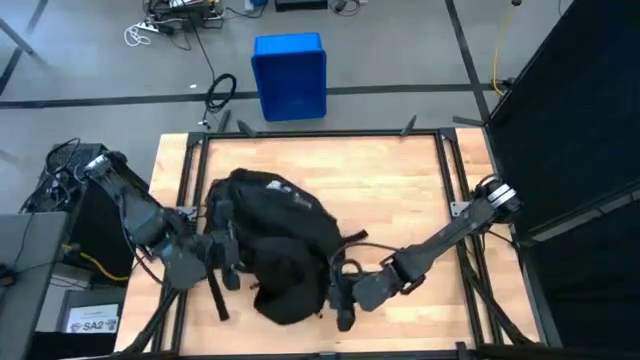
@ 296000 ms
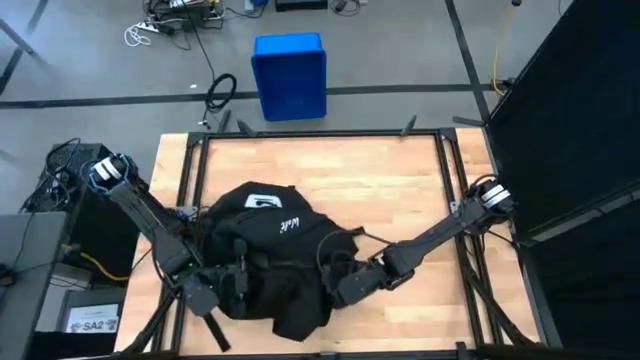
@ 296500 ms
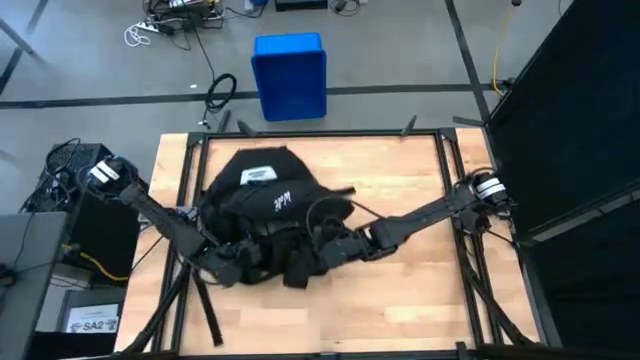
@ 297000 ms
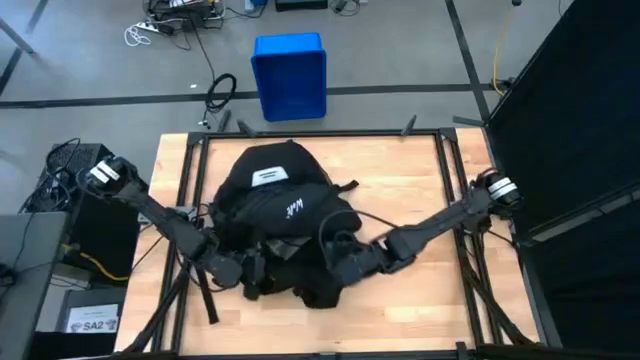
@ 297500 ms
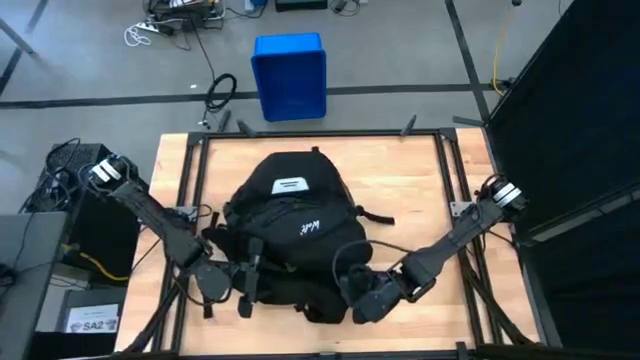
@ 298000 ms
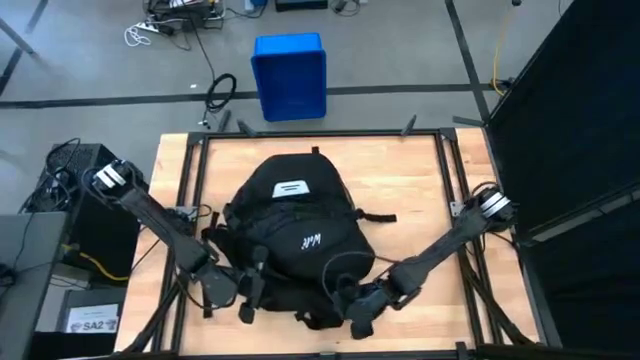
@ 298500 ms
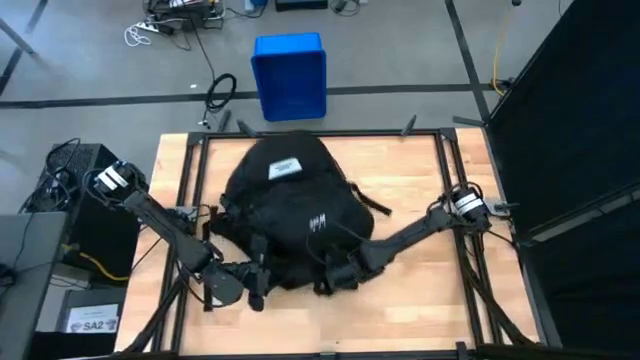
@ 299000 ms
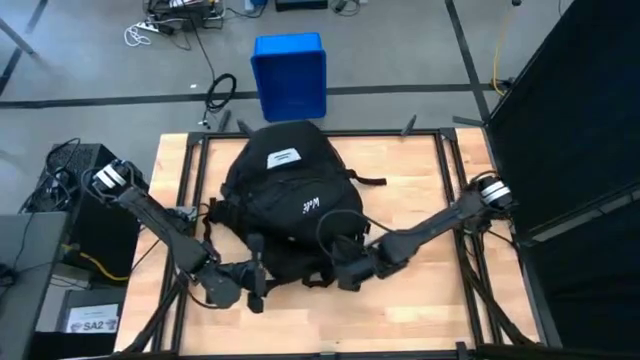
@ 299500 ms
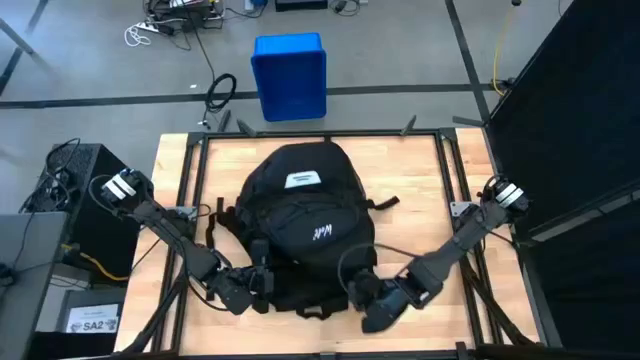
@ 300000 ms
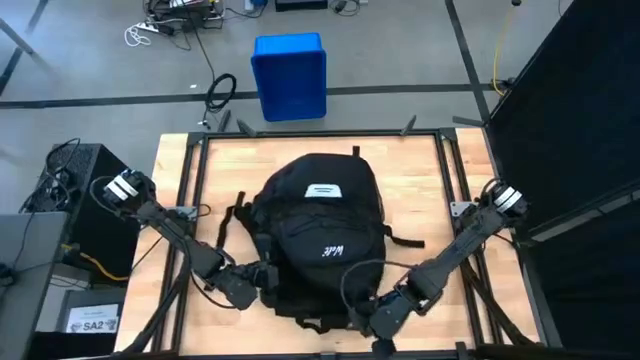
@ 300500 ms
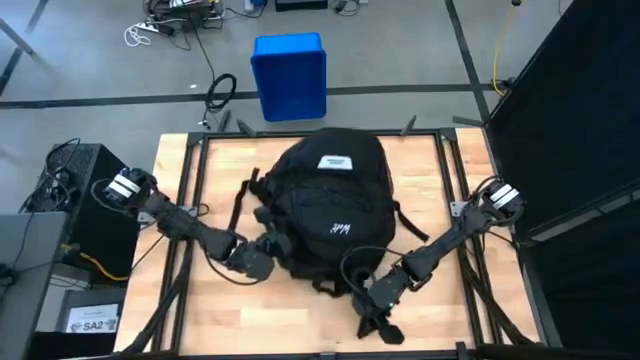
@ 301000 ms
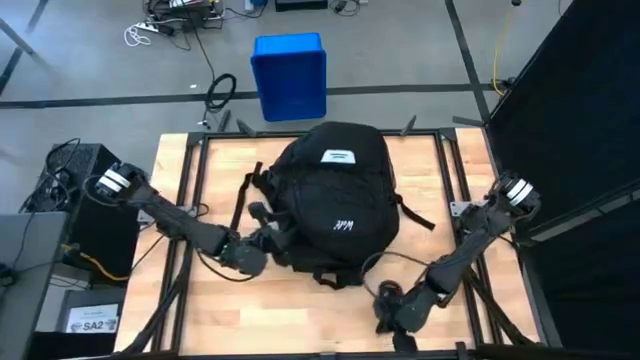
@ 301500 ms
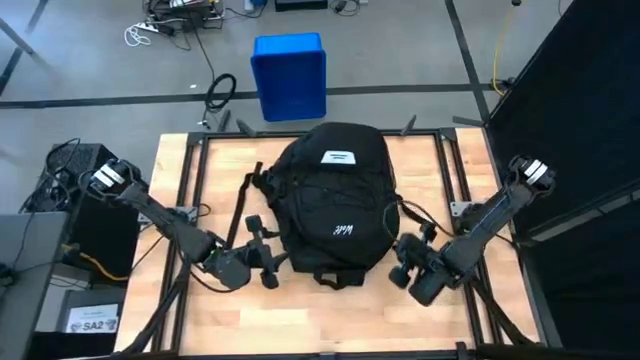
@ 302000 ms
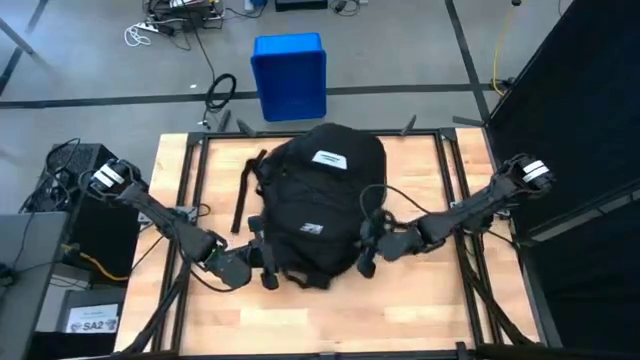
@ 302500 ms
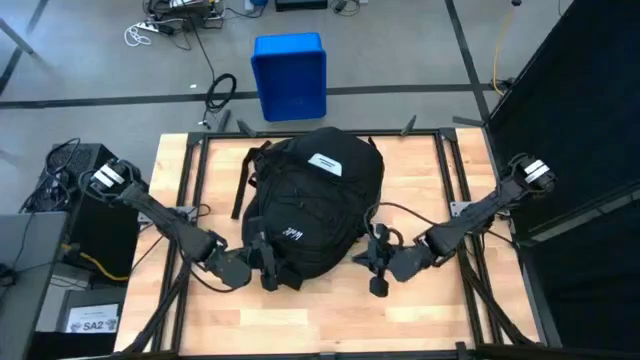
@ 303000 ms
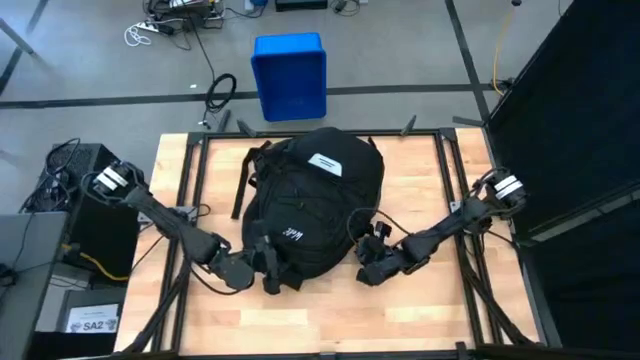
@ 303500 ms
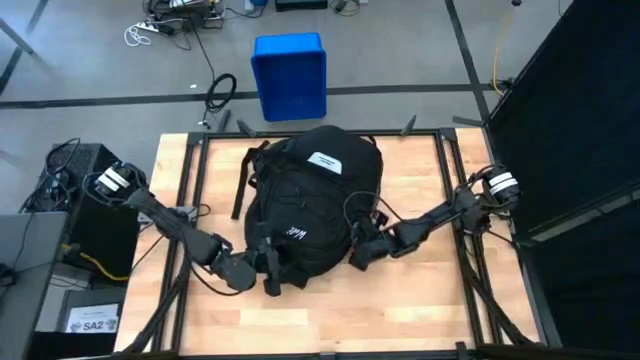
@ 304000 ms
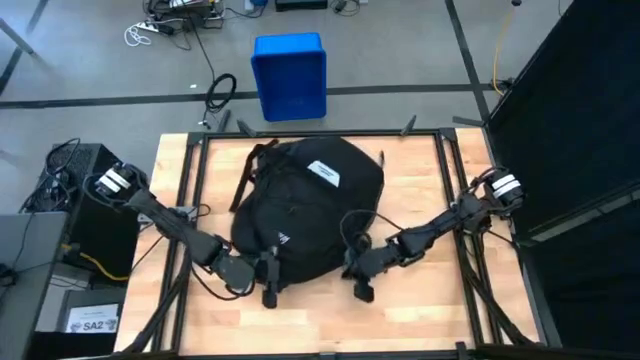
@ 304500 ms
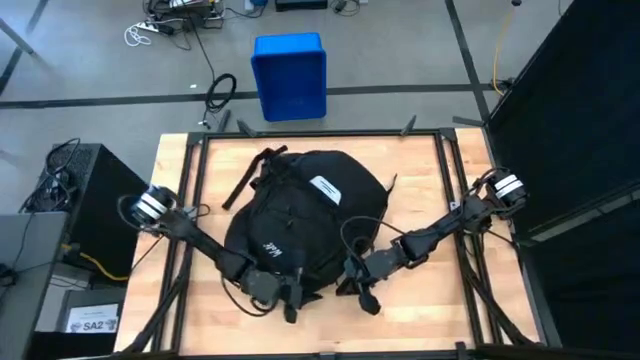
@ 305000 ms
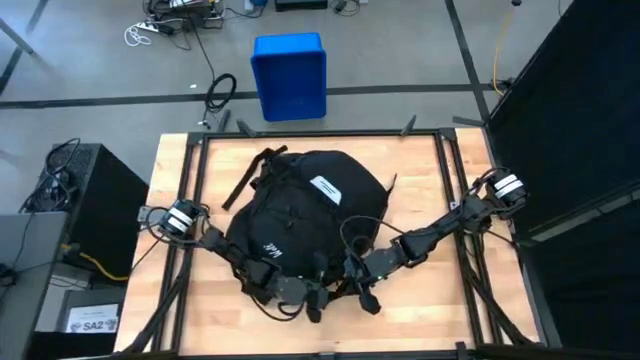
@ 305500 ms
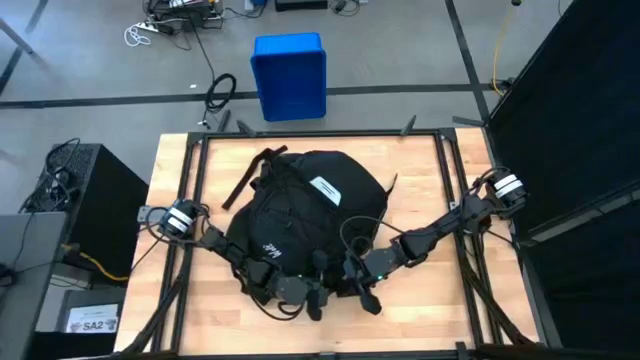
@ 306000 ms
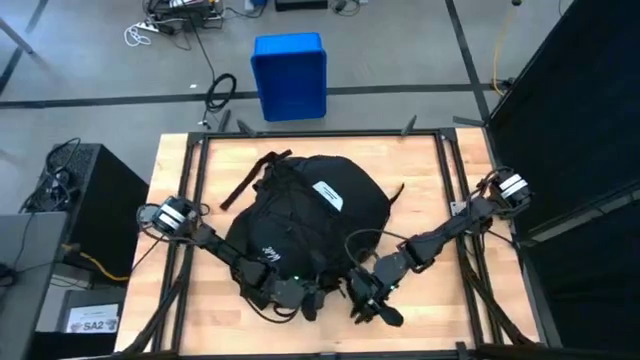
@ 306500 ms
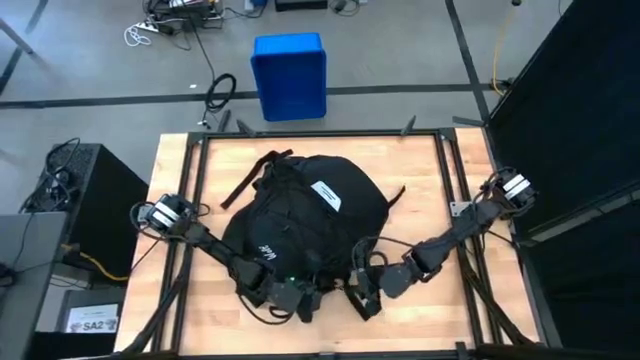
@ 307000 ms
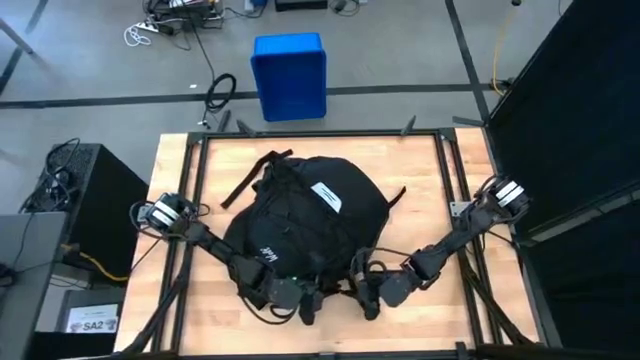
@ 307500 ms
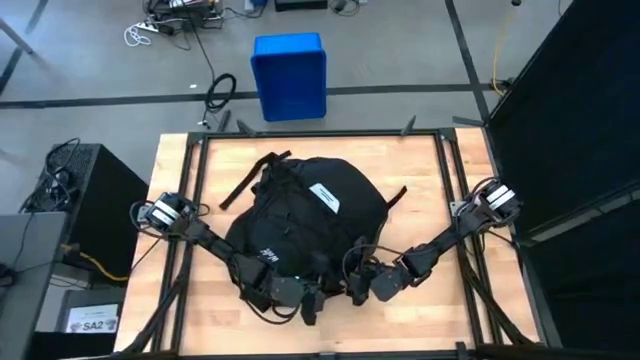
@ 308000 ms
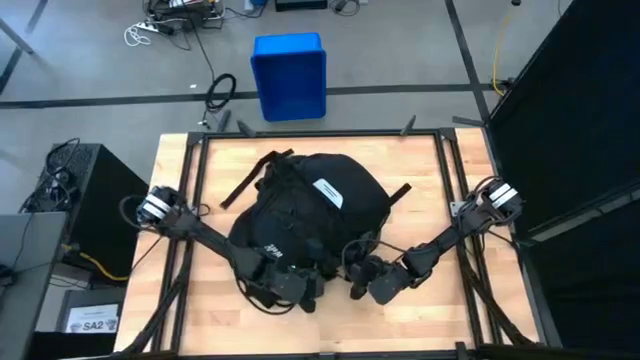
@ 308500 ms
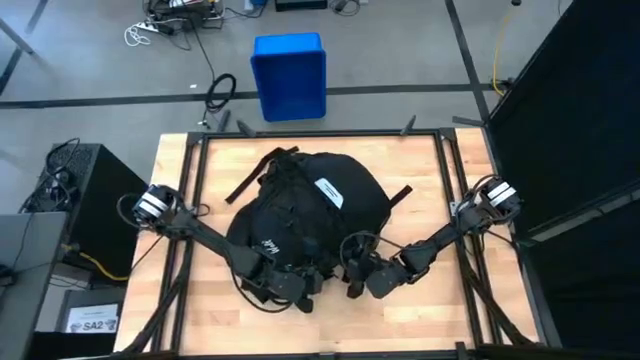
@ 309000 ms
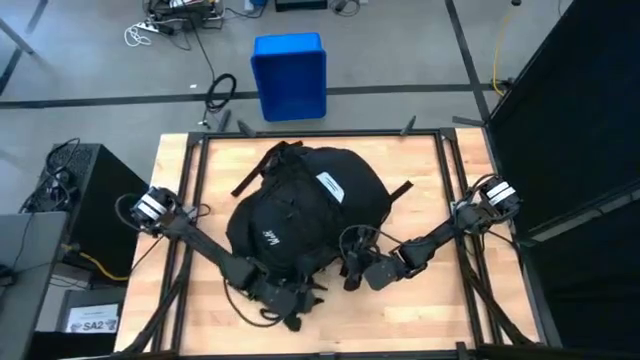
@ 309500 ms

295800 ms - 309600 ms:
Task: Unpack backpack
Close the backpack

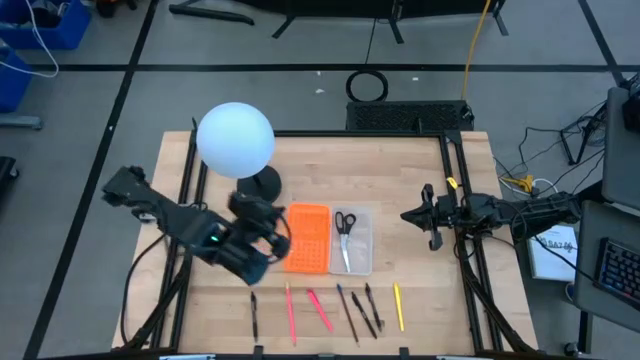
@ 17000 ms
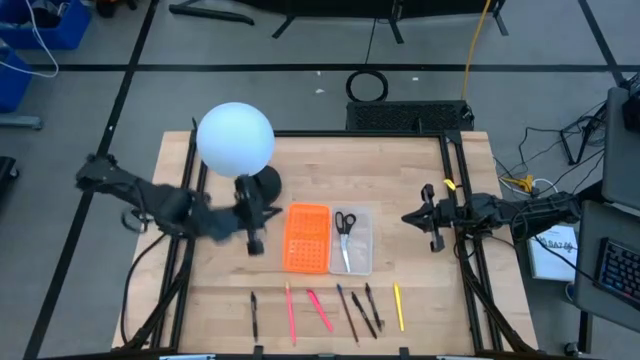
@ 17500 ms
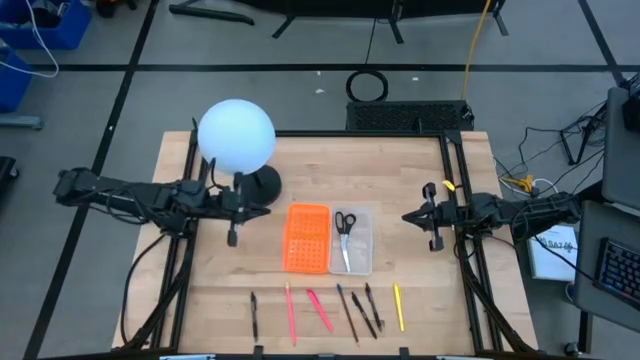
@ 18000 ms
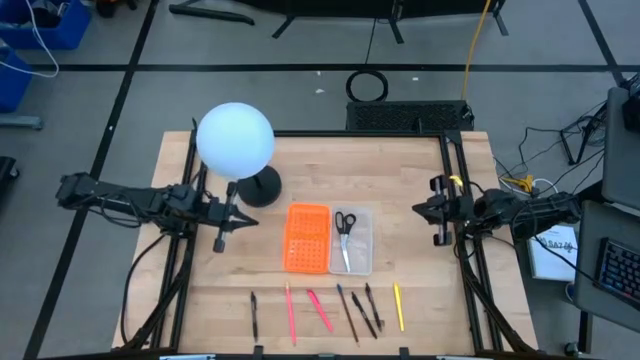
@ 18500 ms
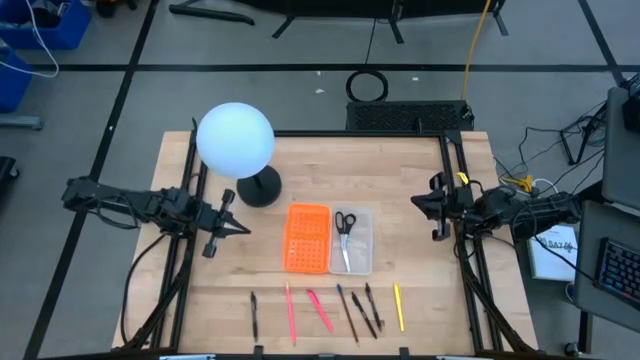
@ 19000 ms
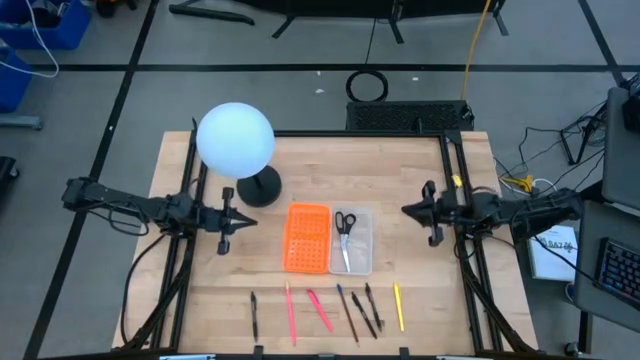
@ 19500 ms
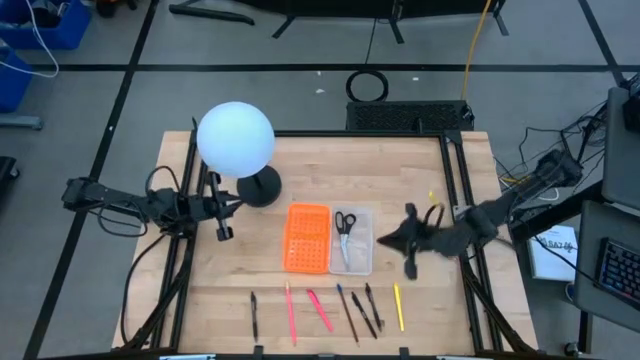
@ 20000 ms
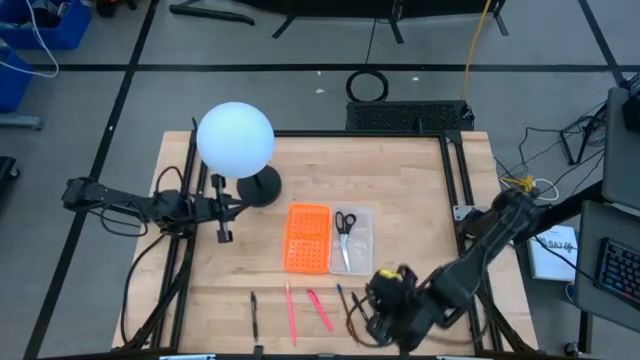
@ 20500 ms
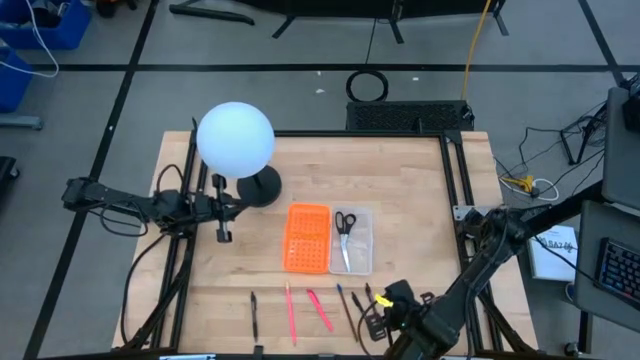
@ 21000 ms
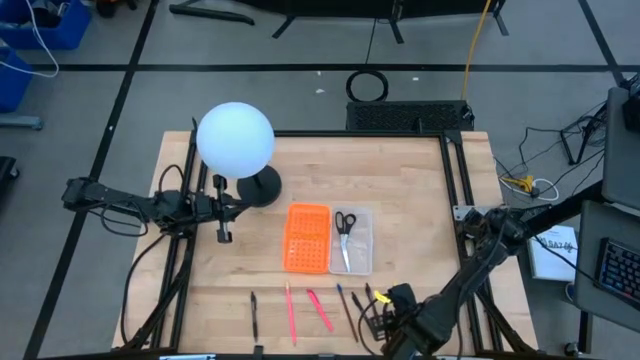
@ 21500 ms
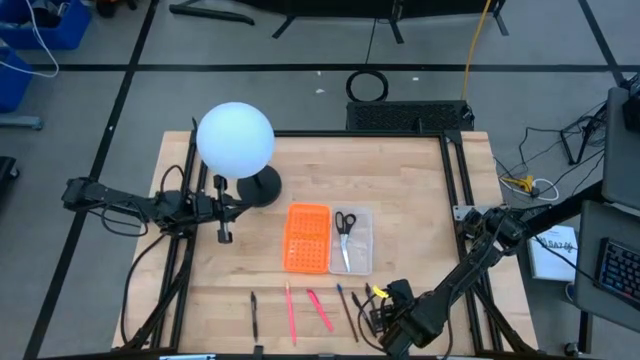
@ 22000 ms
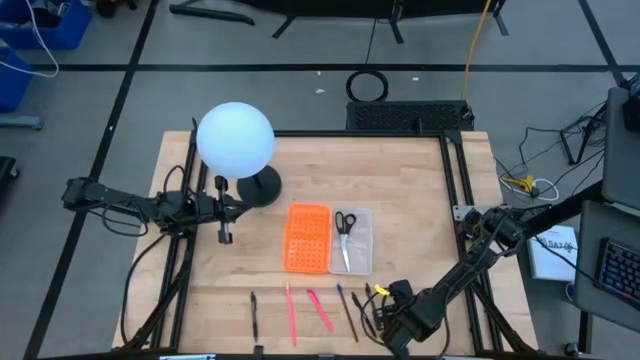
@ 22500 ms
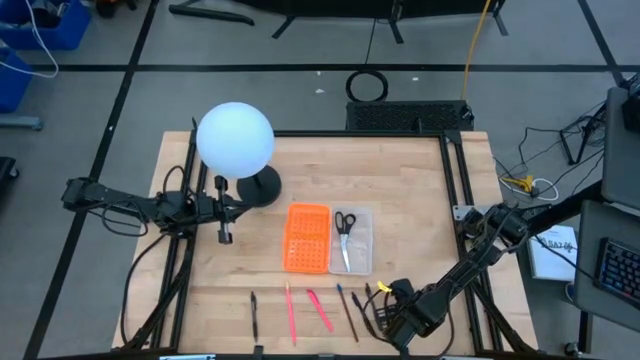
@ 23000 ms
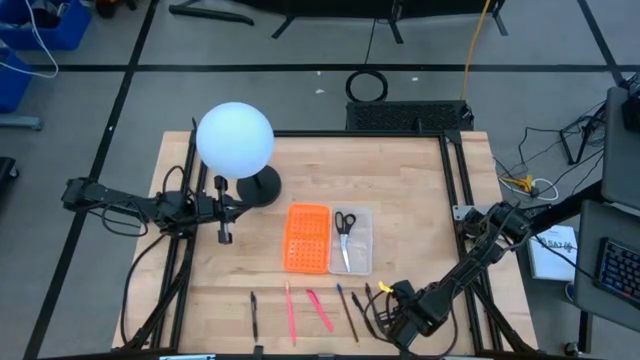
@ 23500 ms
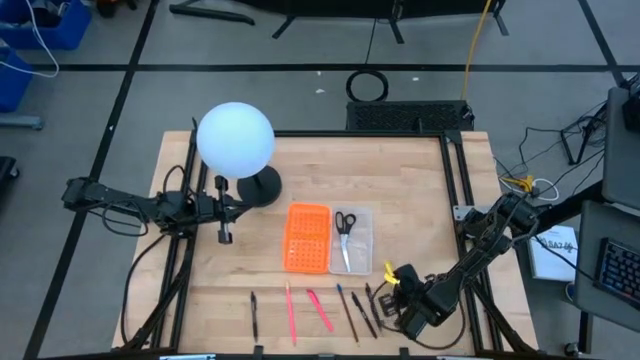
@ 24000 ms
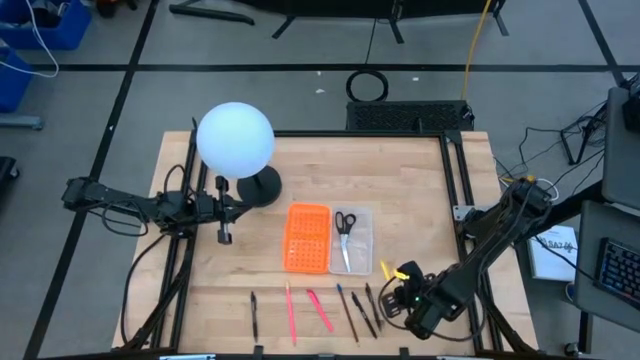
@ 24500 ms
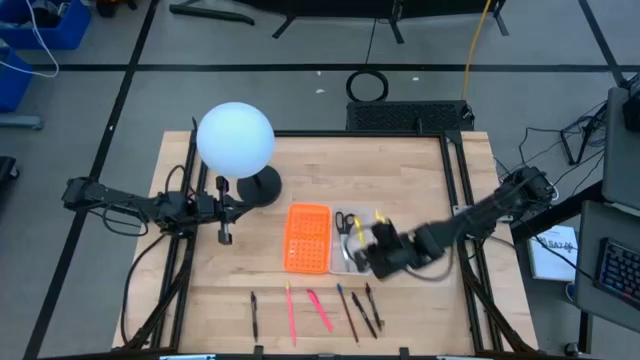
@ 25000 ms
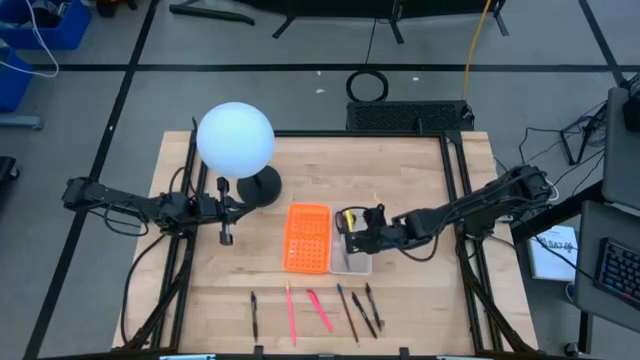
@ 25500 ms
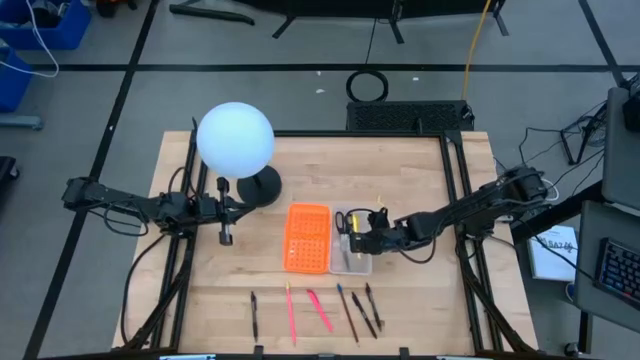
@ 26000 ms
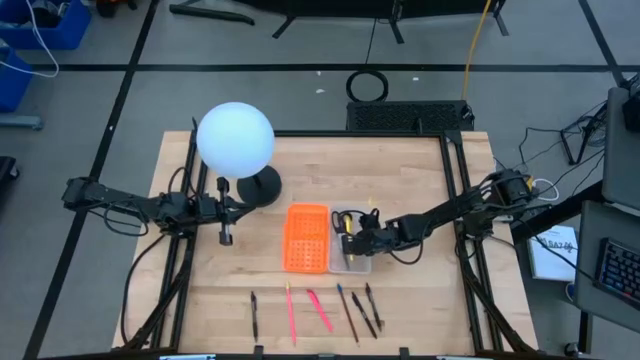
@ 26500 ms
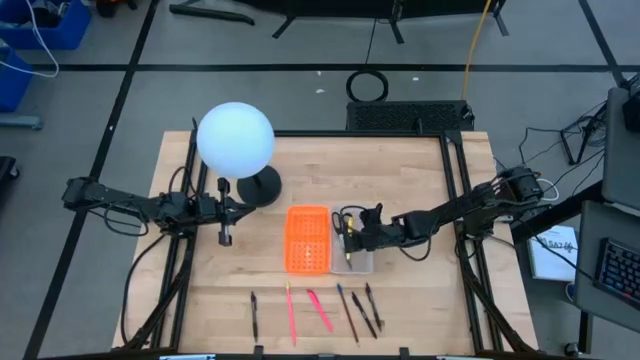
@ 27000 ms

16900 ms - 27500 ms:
Task: Pick & place school supplies into a supply box
Put the yellow pen into the transparent bin
